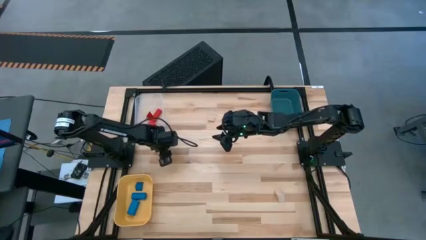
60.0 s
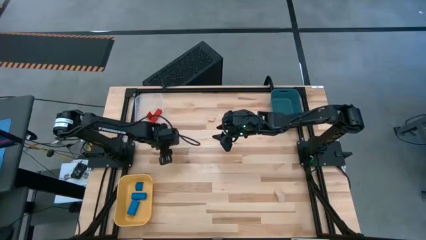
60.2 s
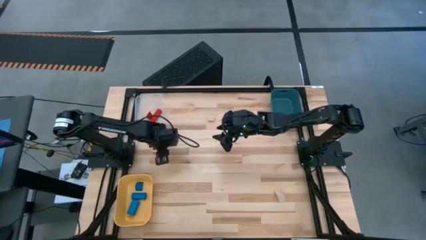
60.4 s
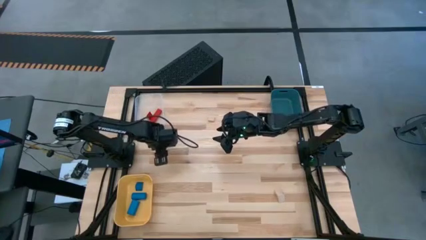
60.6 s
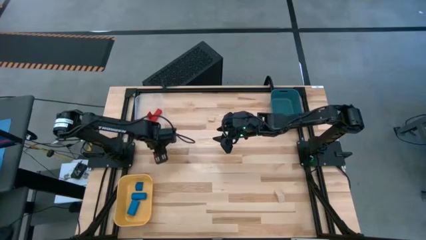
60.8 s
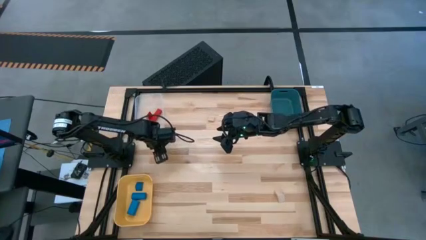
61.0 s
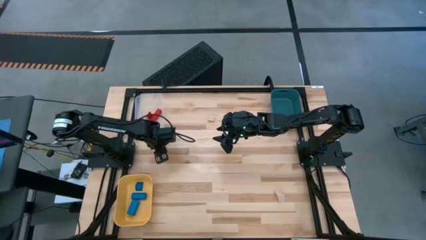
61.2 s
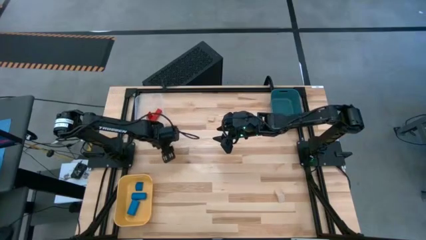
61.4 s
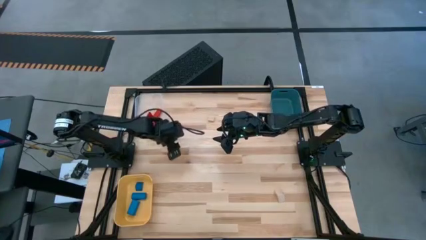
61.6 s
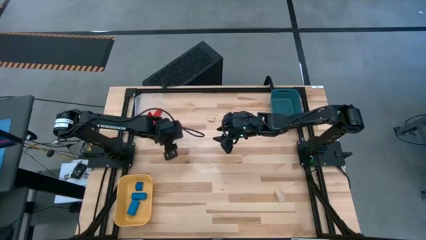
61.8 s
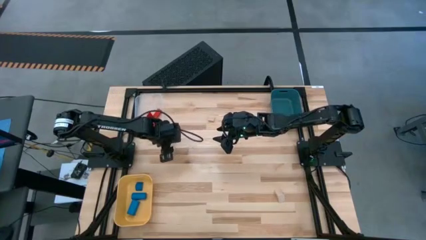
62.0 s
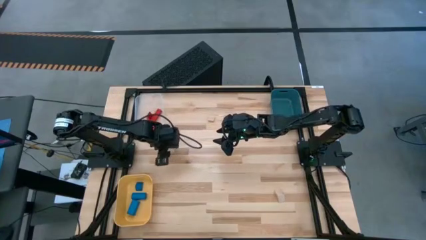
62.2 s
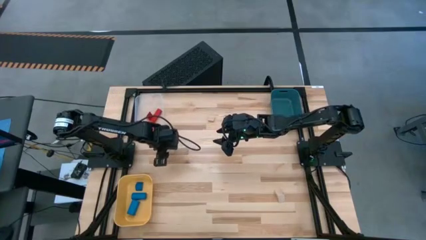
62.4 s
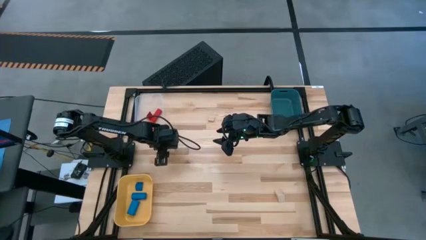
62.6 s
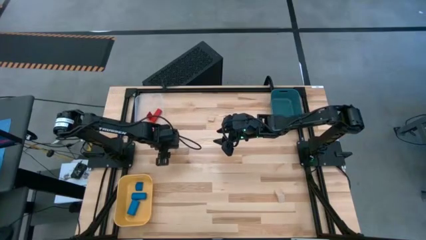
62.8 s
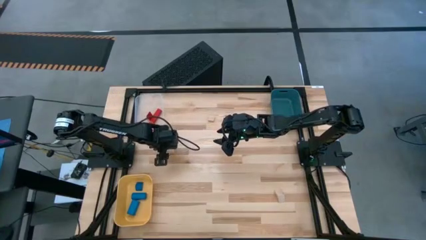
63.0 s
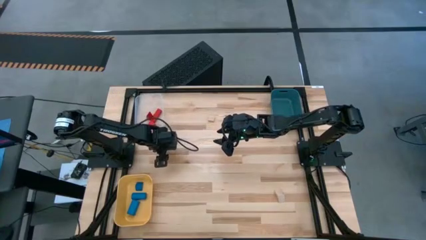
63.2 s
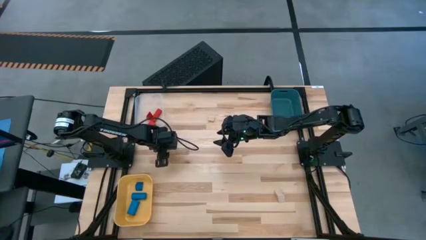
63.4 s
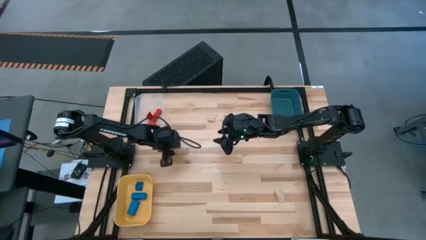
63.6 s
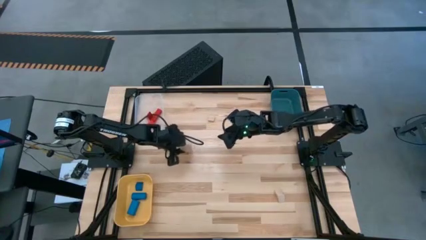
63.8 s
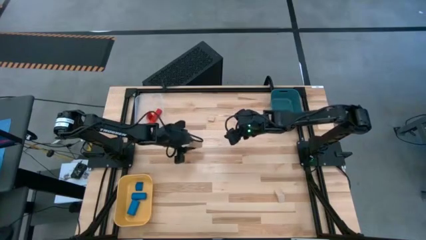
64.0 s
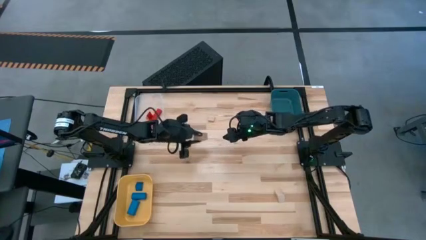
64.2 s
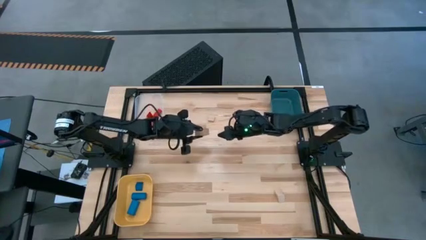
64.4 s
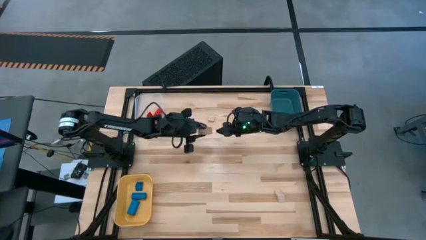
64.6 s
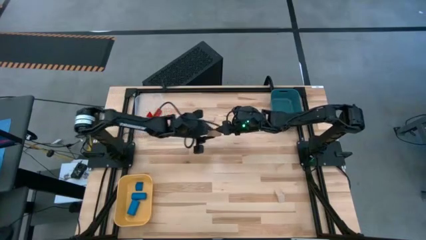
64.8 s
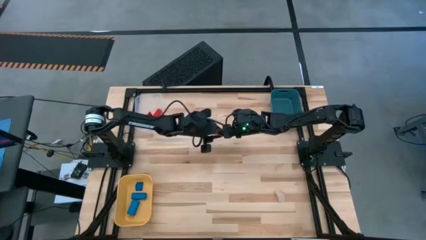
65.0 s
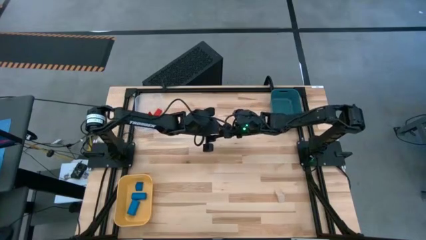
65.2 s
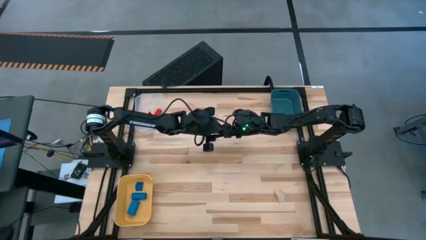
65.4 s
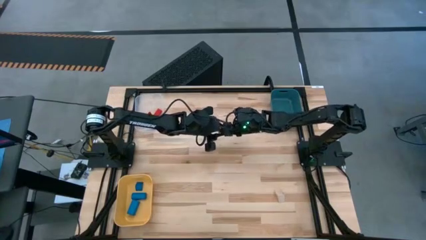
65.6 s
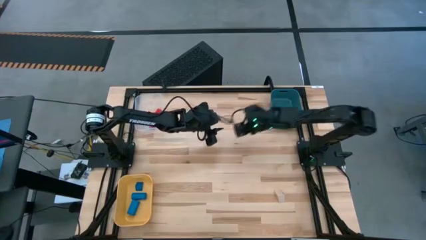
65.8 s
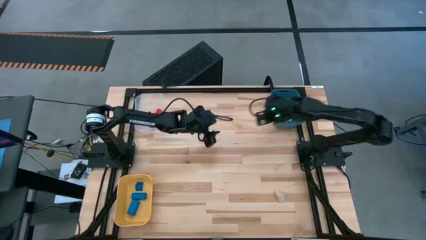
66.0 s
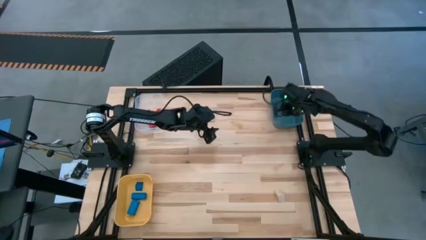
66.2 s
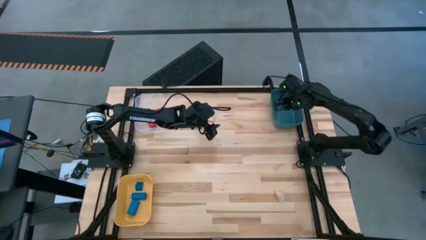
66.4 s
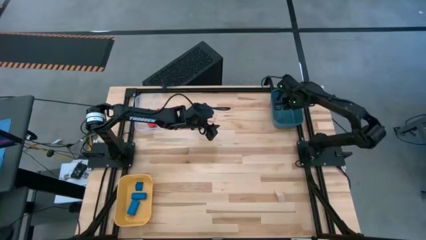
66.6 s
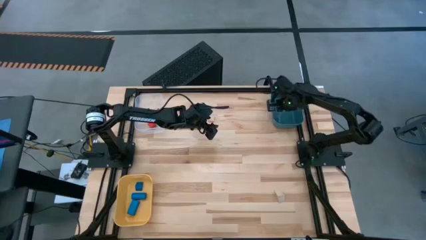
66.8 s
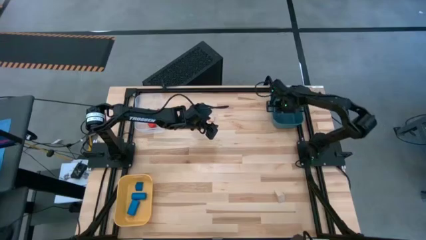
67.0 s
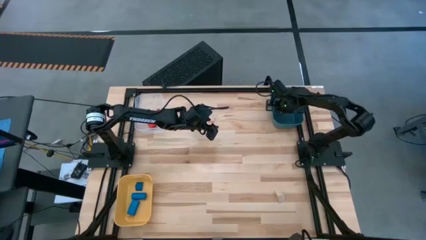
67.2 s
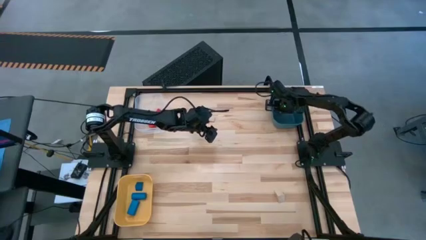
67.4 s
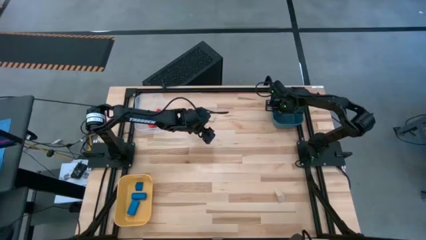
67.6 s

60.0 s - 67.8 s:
Task: Sort & place blocks by color
Put the middle brown block into the blue bin

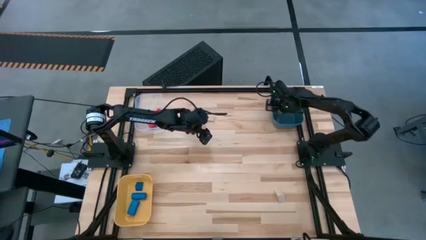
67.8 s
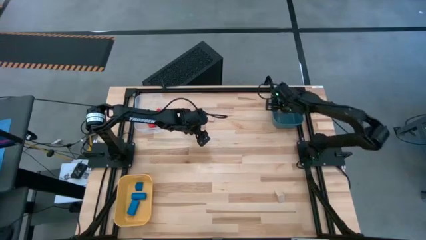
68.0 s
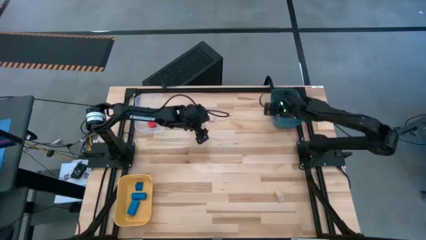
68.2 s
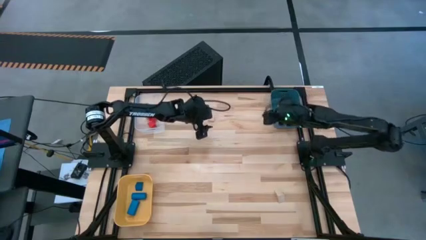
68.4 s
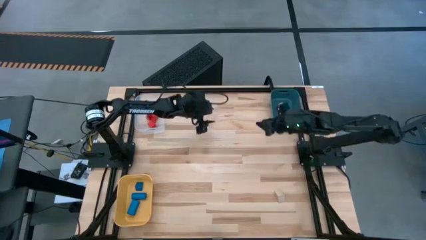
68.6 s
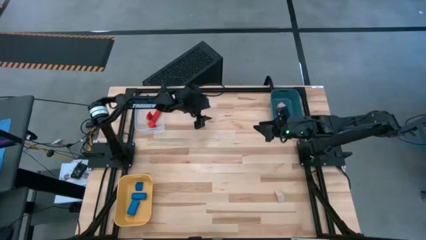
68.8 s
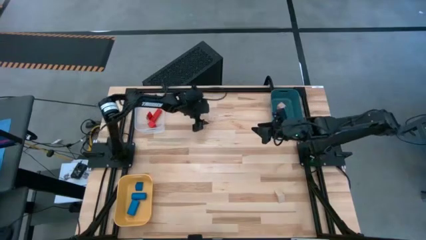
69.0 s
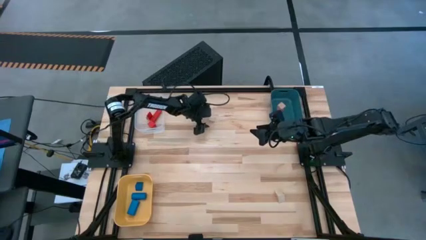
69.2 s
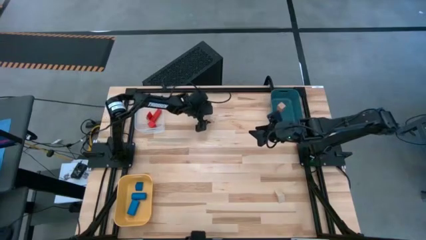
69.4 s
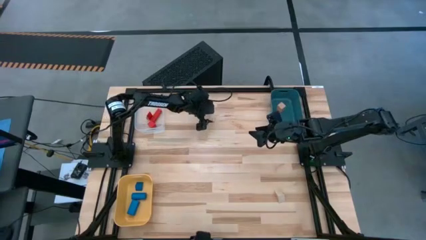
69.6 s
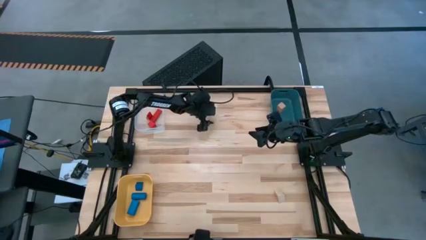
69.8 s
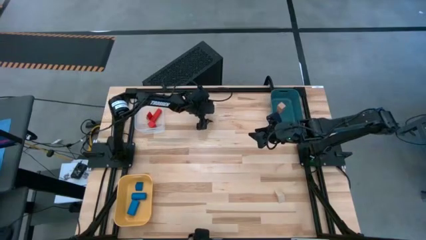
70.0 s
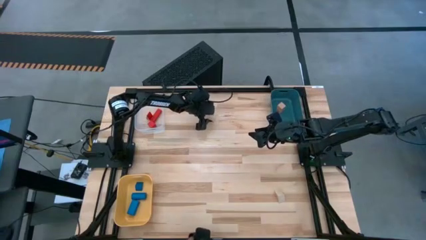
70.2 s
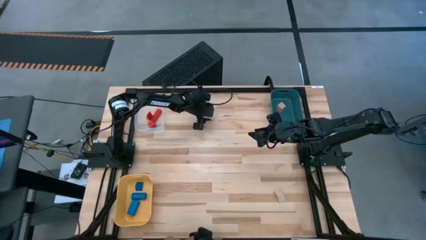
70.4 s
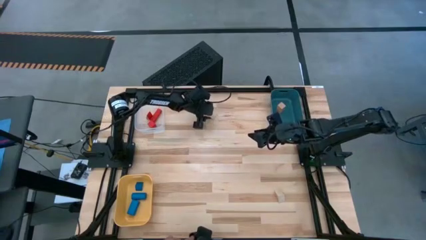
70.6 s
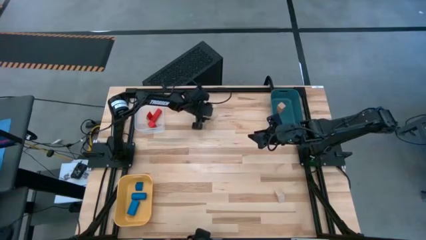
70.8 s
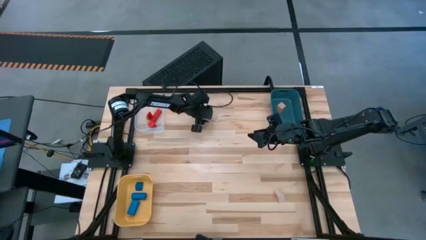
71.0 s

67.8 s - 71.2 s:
Put the top brown block into the blue bin

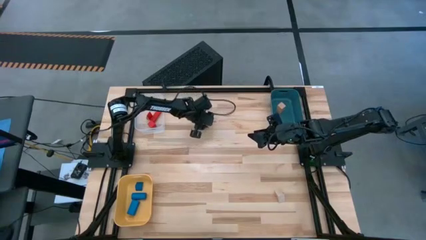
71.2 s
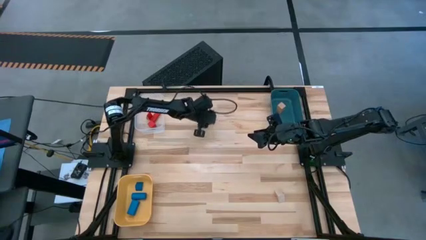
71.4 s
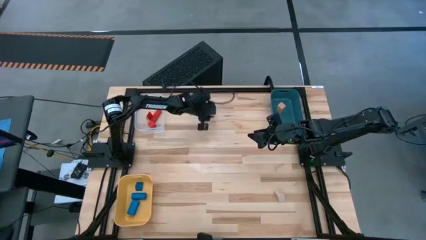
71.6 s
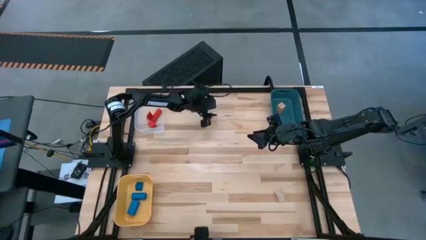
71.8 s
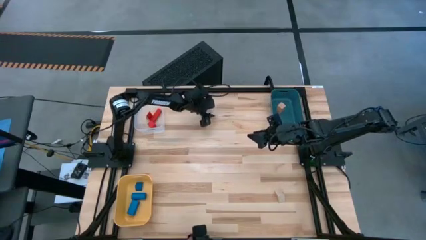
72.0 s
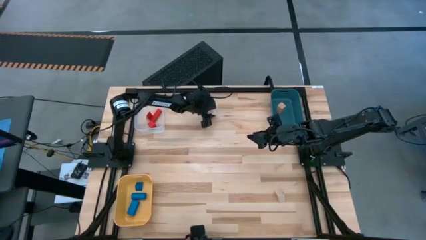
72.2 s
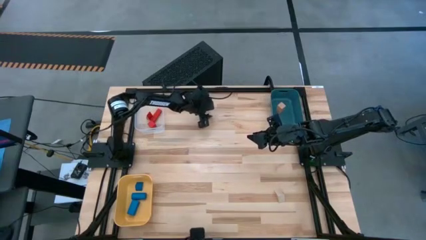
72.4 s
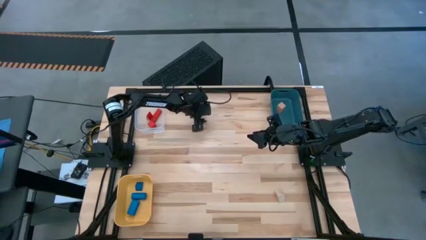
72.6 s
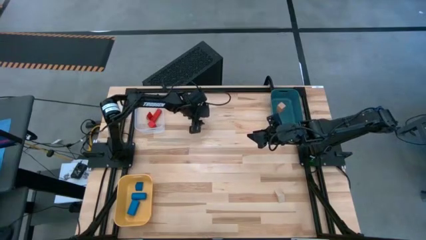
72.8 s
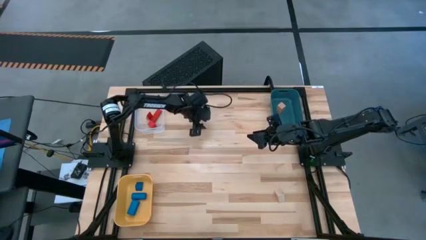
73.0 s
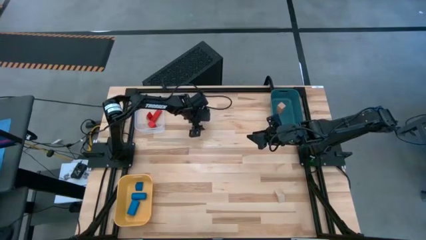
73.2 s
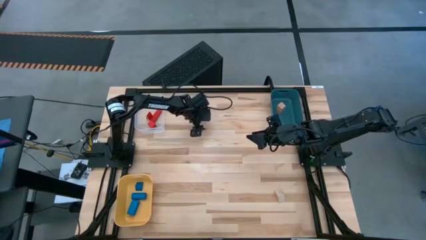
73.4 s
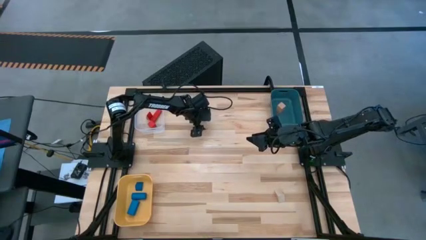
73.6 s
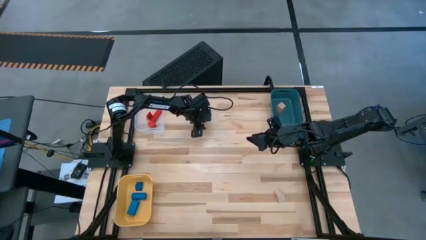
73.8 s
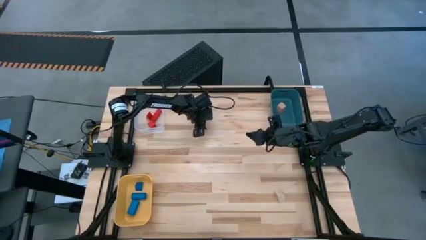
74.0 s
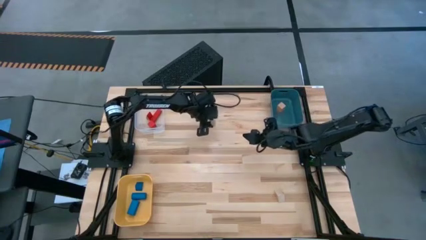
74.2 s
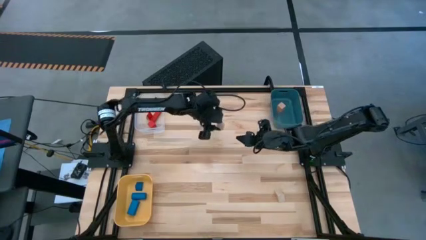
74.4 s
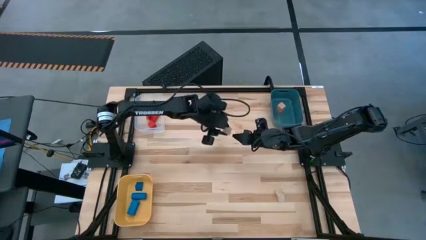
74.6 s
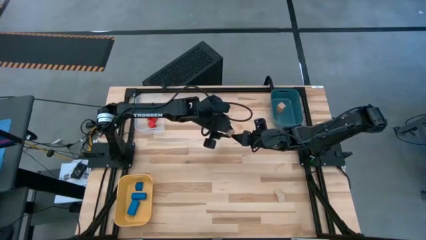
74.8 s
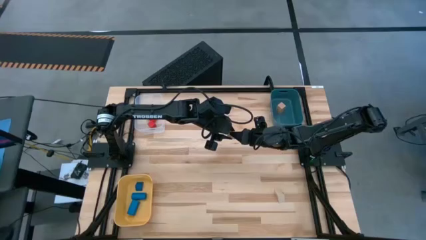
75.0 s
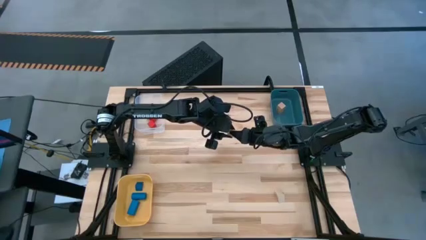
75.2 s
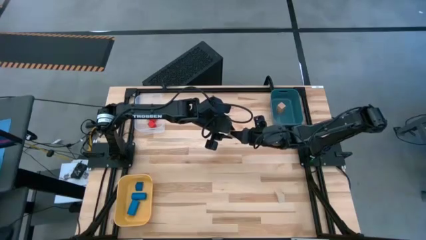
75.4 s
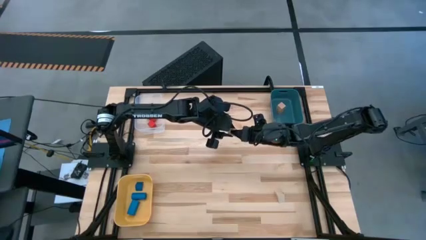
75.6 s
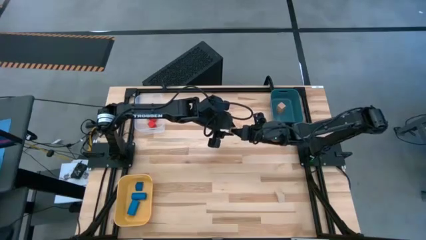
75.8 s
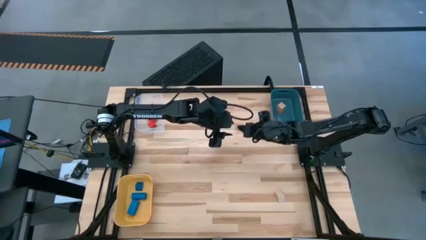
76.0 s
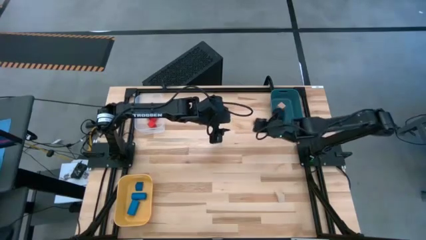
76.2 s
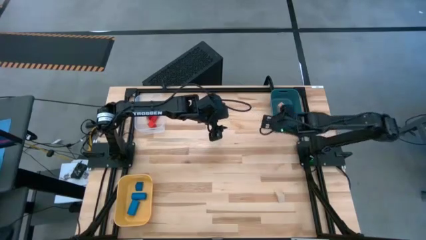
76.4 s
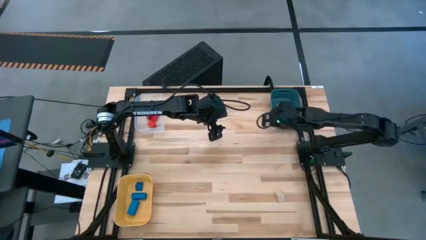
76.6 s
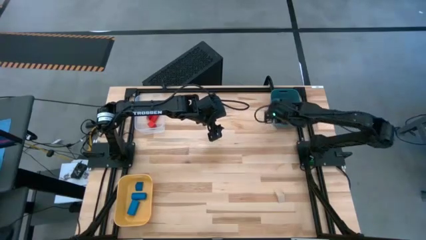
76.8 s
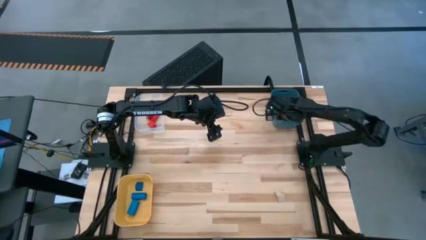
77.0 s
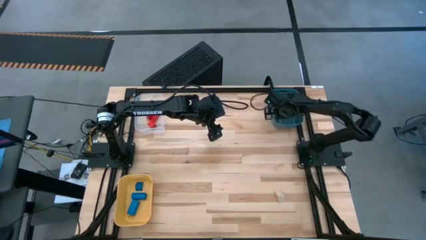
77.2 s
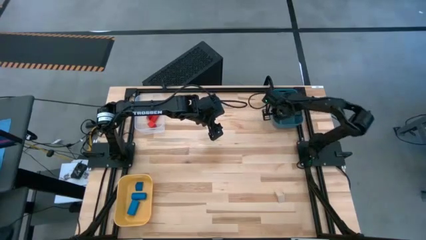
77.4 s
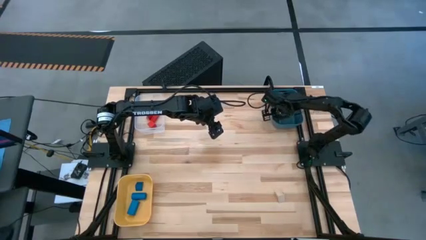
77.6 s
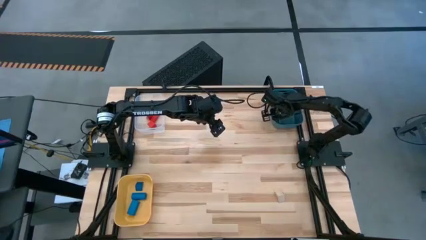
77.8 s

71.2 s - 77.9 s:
Put the top brown block into the blue bin
